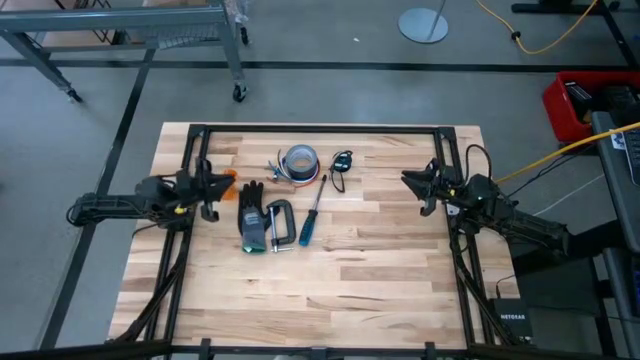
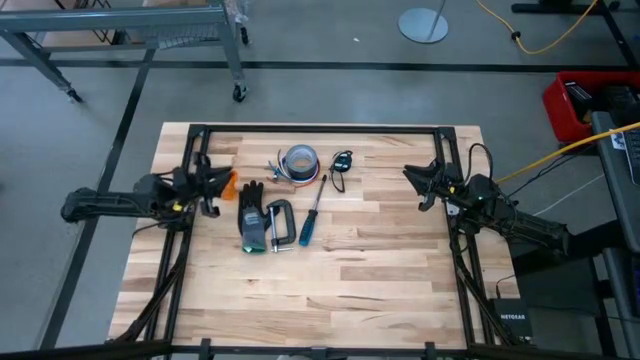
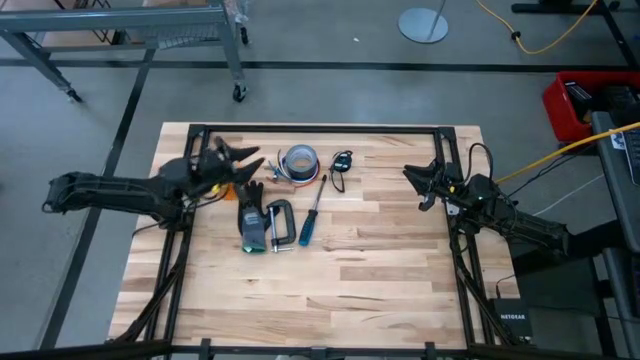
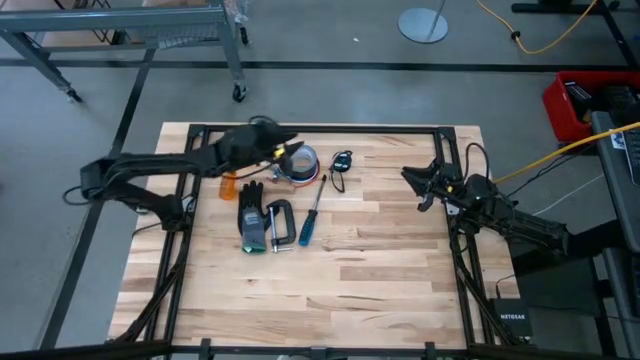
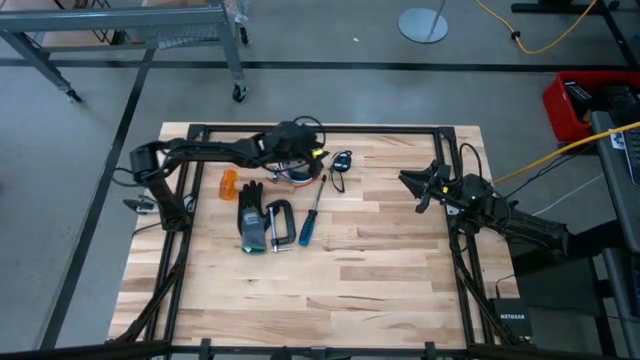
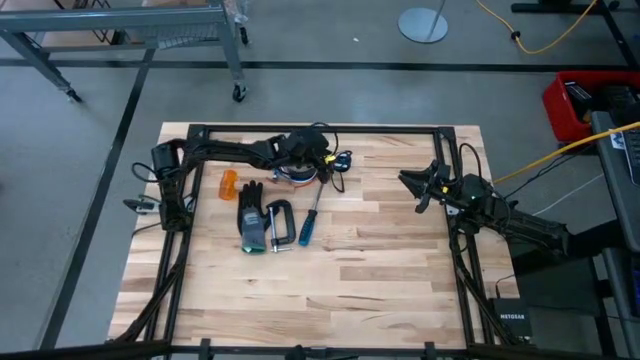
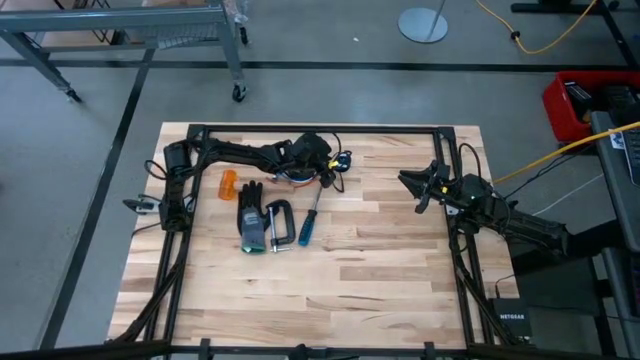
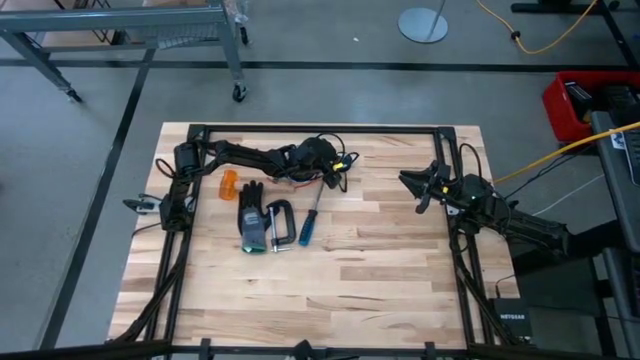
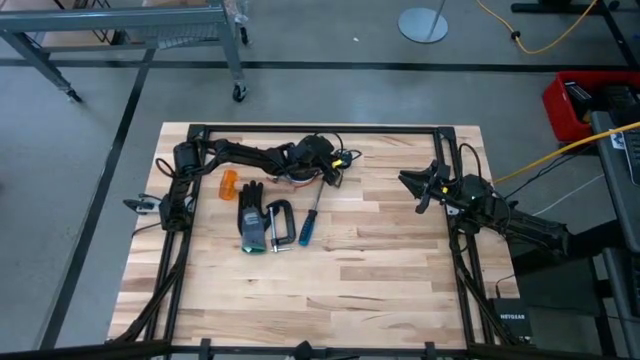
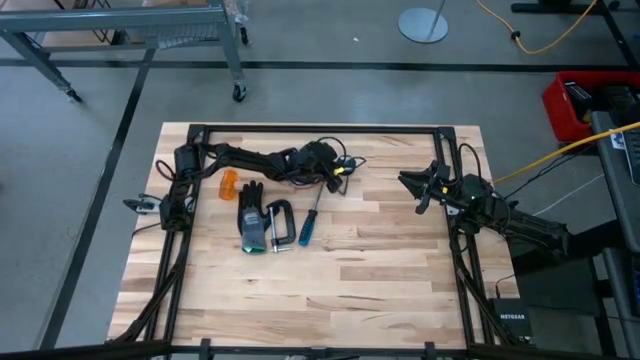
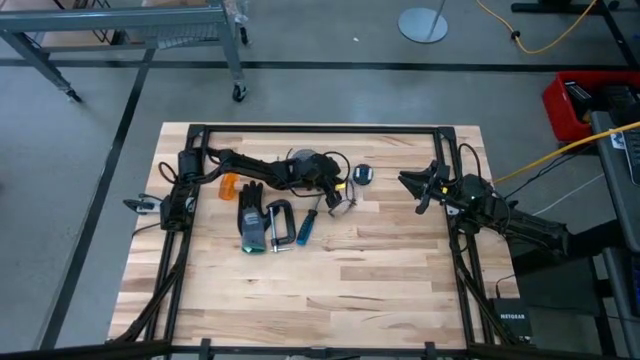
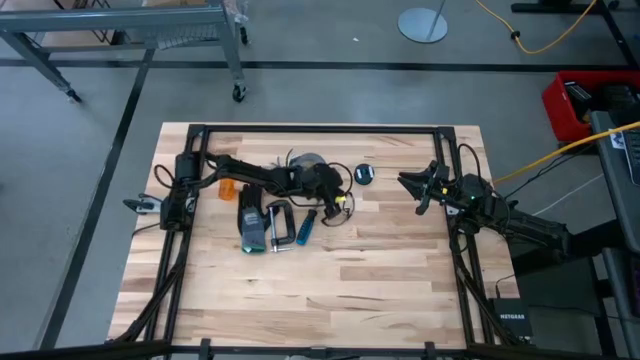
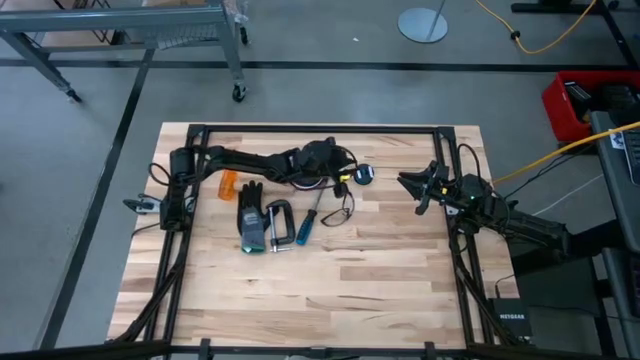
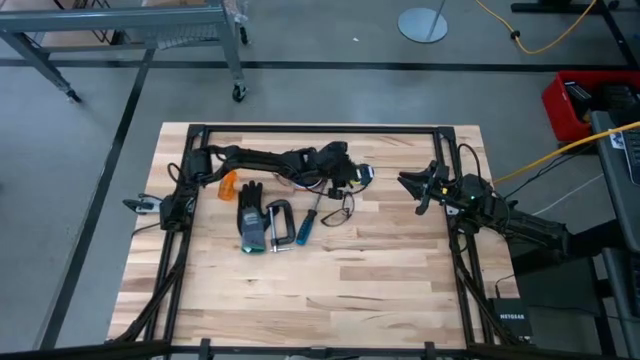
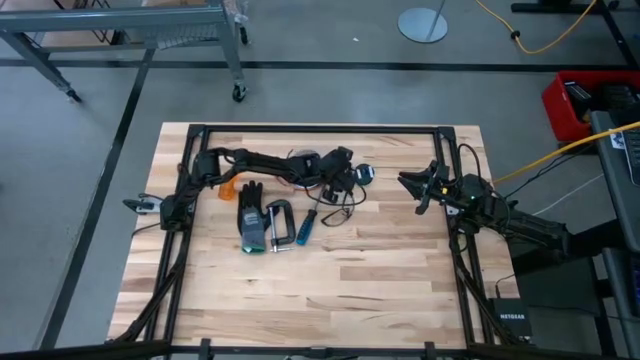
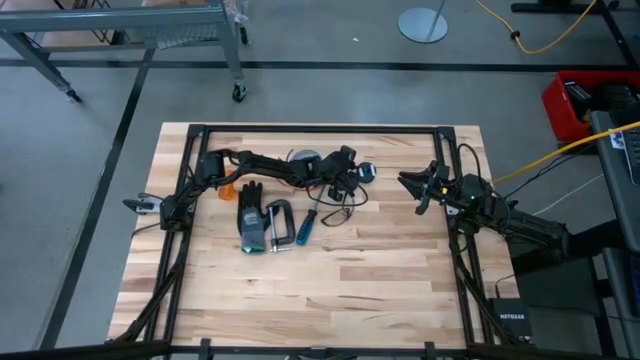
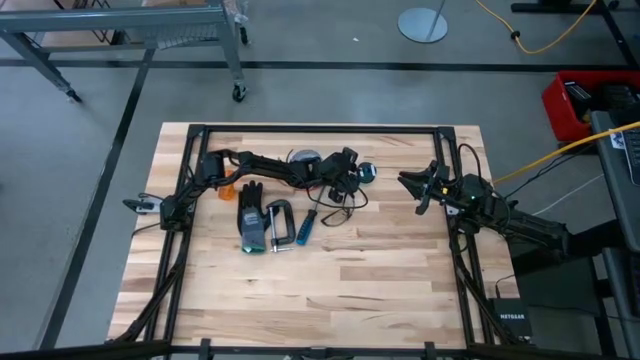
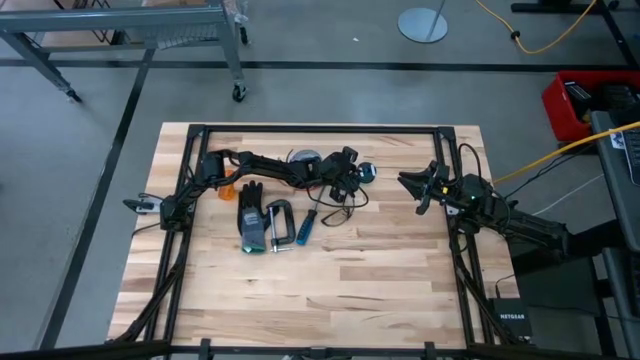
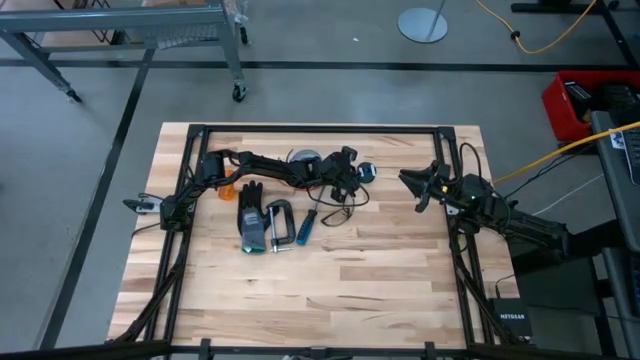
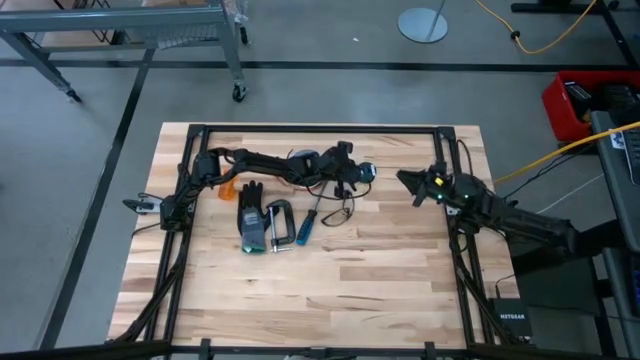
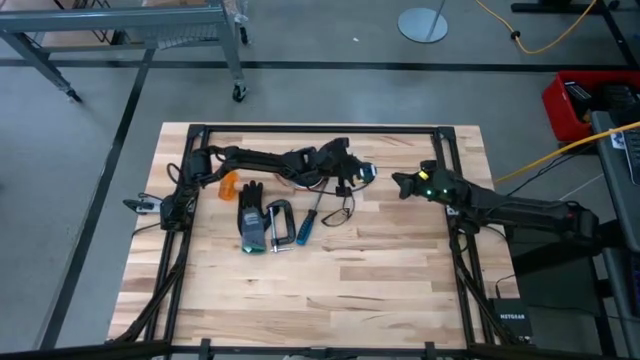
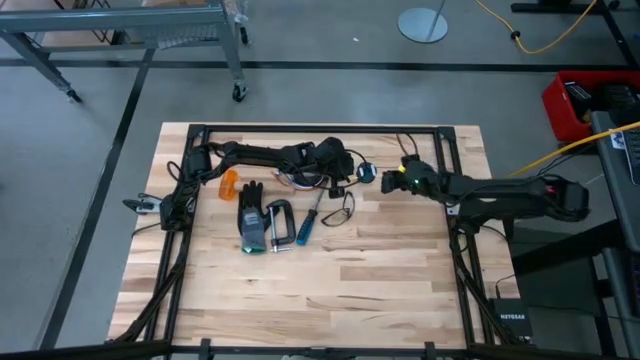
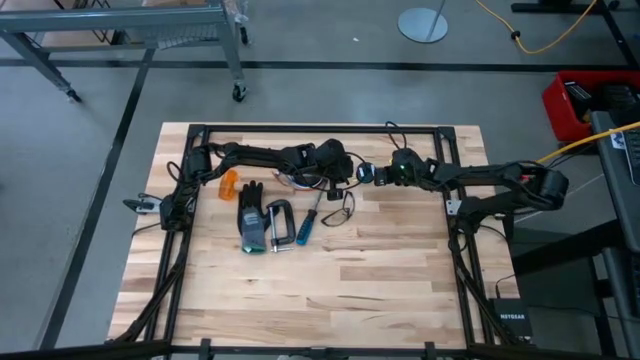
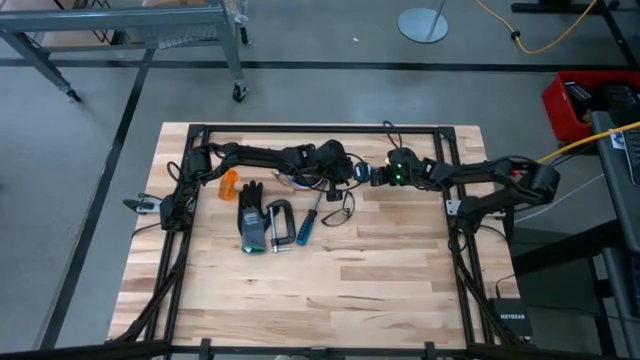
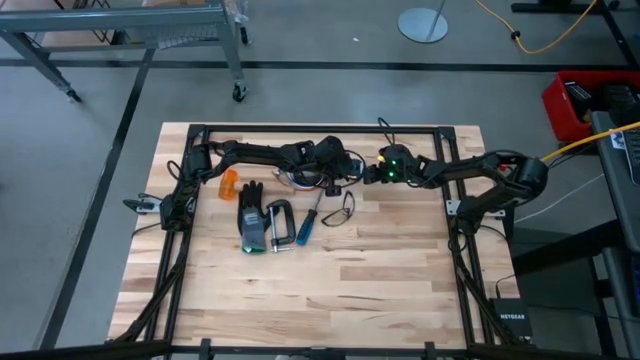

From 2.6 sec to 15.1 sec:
Task: Coil cords
Uncoil the wire from the cable spool
